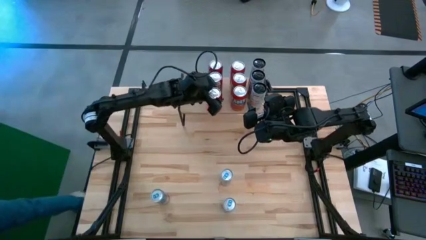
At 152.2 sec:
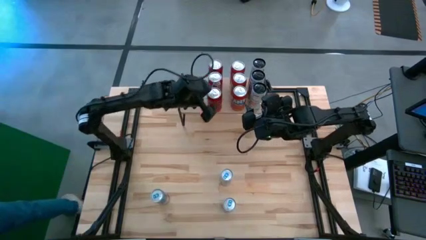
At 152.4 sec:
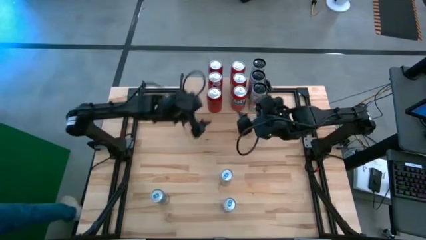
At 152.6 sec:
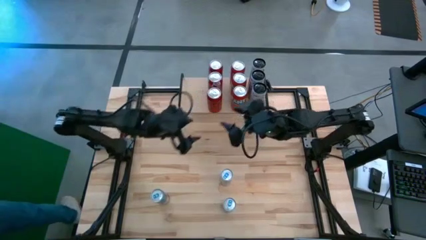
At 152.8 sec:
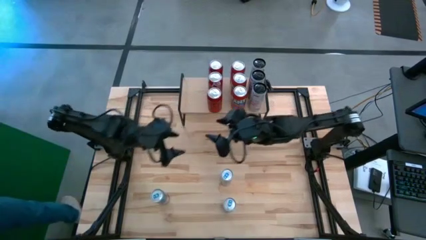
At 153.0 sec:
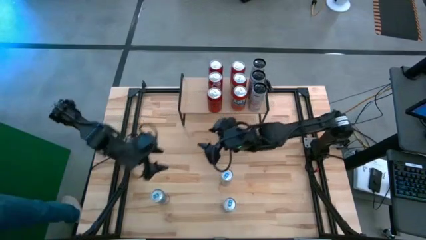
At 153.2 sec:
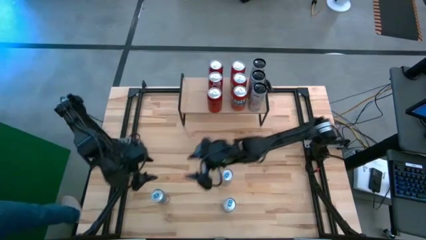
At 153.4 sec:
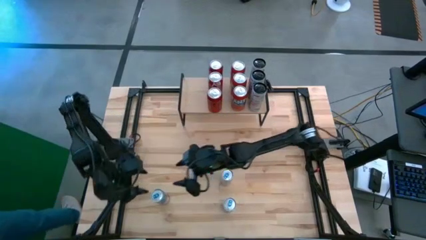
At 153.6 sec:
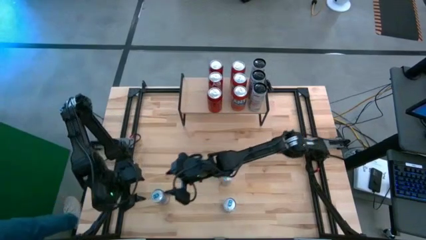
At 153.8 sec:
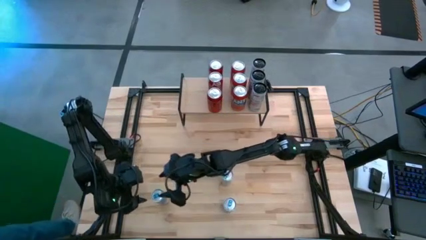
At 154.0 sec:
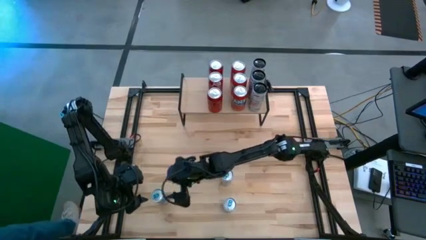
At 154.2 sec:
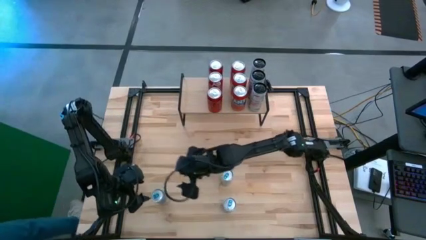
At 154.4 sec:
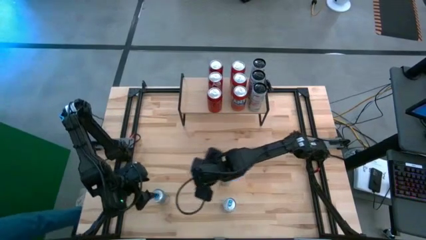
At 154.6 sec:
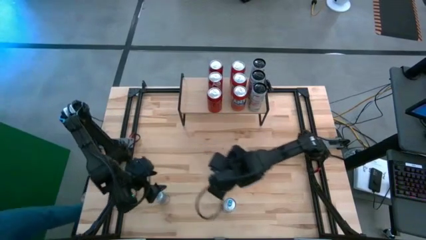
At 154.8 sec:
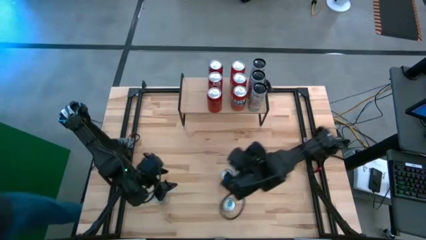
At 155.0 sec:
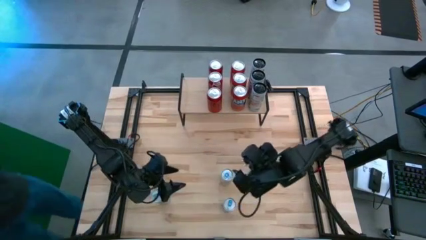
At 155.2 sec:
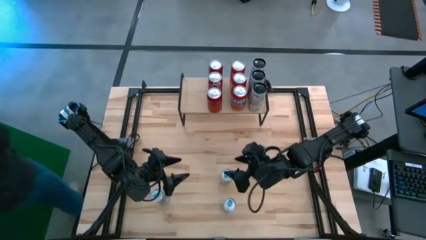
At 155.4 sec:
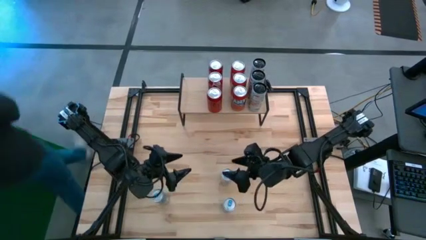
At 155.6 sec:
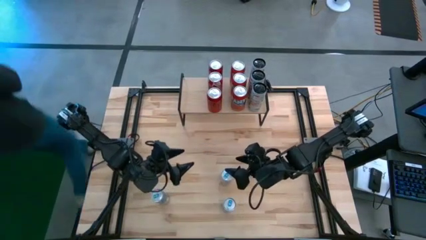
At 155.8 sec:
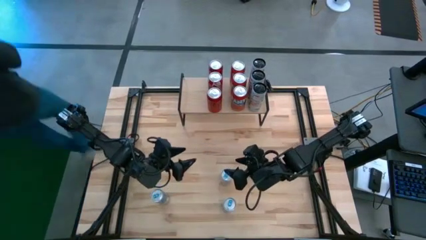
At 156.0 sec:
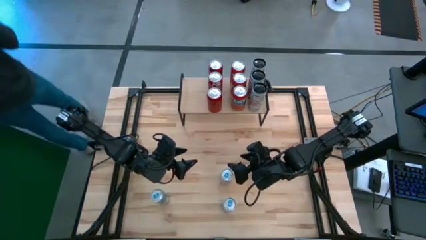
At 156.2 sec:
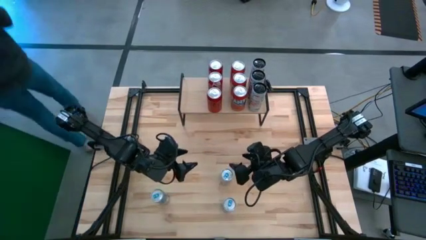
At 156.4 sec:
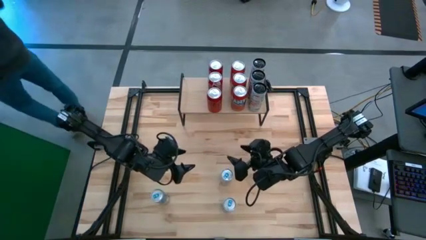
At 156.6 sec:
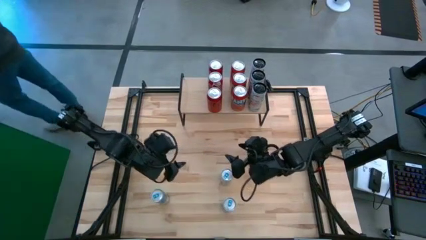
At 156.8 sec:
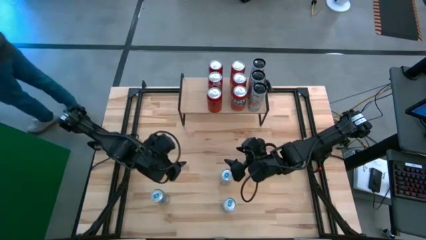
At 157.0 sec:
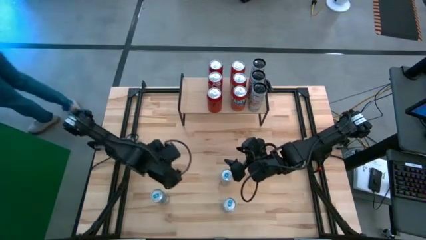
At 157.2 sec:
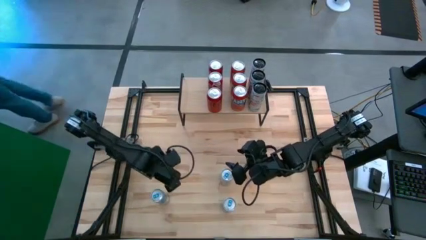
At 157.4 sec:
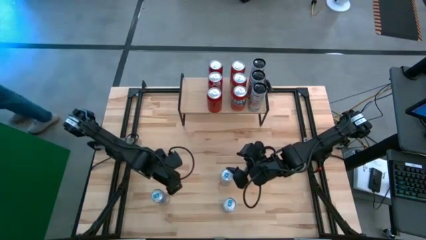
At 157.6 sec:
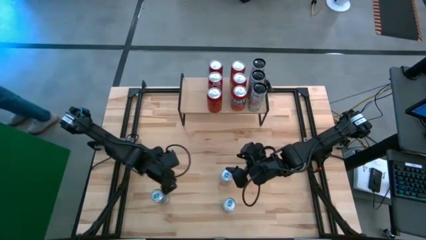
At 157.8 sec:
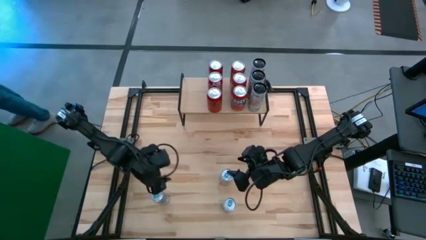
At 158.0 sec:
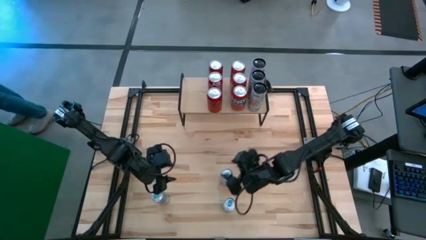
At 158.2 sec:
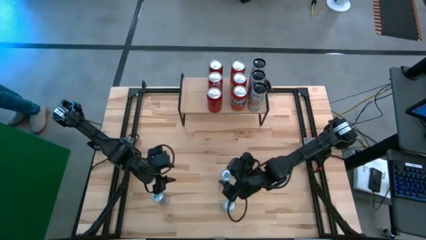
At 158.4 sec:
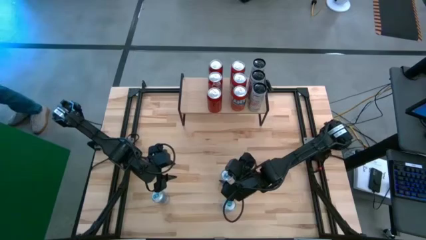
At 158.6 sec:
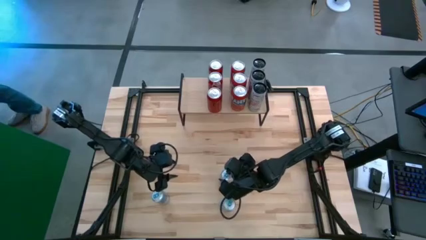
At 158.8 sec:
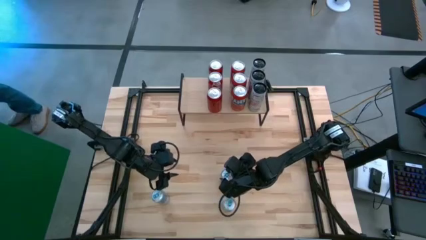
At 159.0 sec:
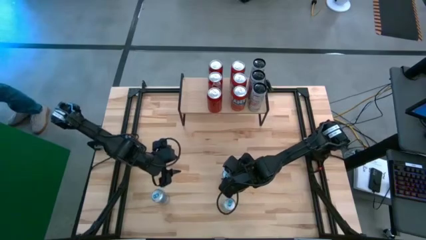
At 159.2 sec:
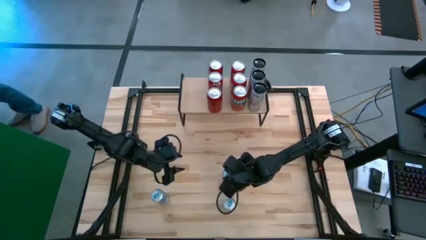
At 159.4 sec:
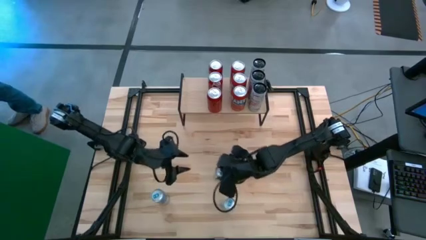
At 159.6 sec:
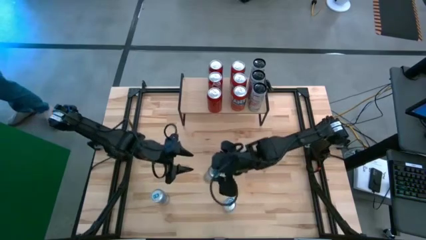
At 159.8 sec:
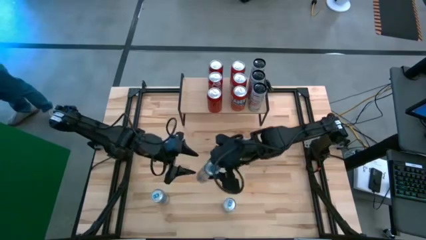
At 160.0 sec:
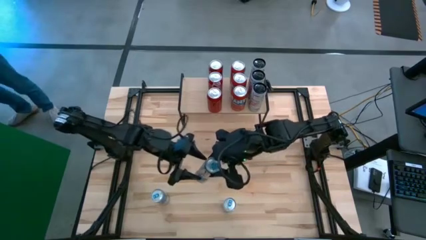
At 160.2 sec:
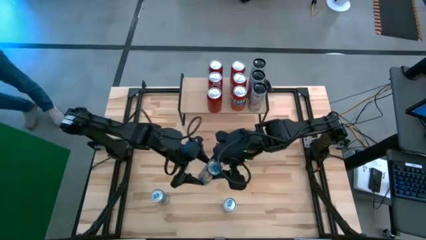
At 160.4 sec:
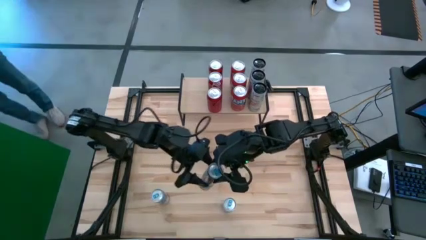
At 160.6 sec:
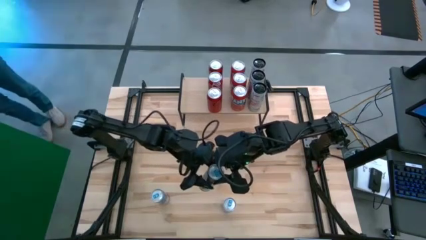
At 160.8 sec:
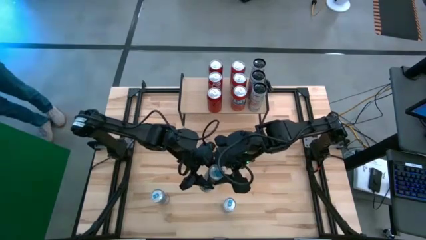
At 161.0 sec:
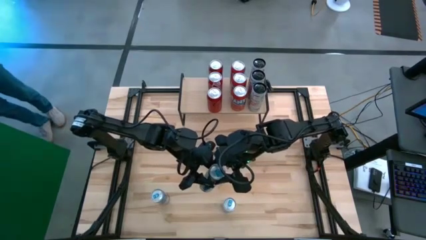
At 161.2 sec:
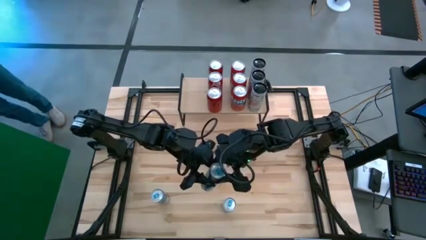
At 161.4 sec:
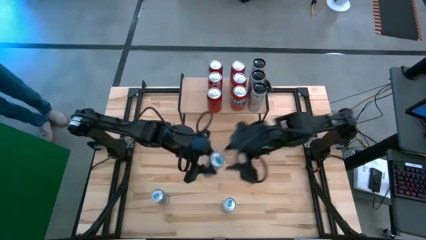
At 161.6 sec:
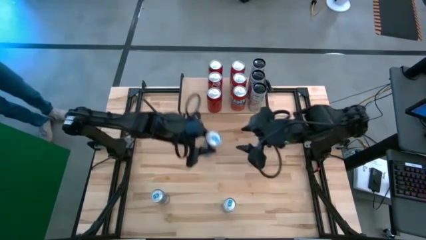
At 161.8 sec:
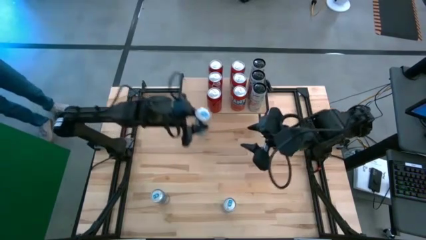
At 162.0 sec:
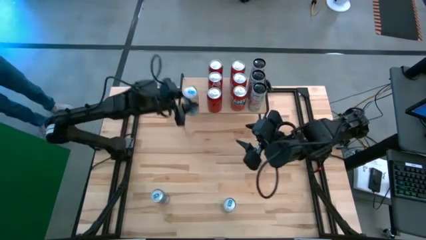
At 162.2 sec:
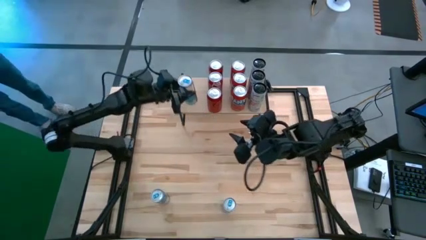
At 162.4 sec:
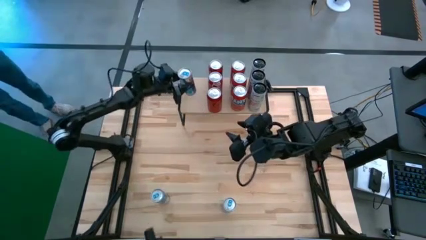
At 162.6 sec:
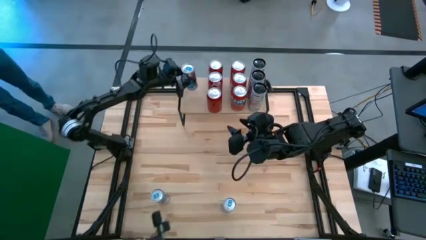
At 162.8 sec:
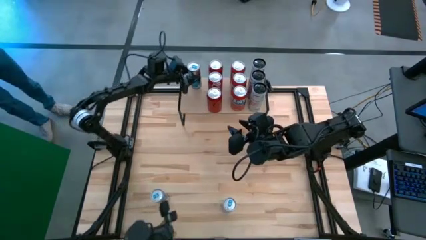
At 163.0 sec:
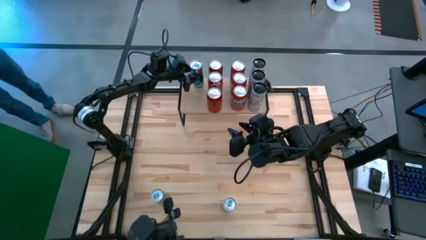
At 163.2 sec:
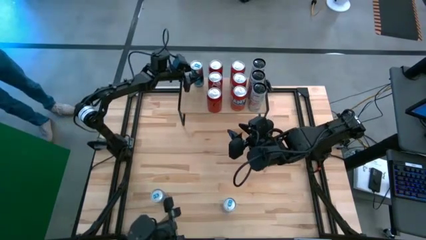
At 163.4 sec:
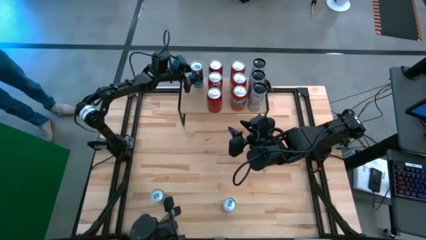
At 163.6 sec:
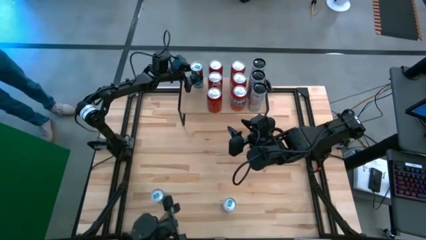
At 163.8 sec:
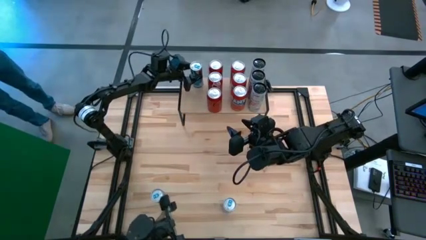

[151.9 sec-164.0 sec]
Task: Place canned beverage on shelf
Put the top blue soda can on the shelf

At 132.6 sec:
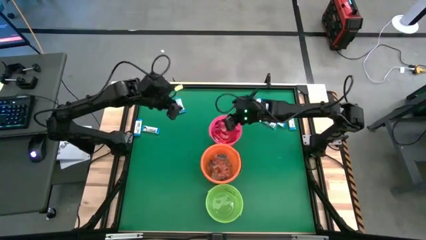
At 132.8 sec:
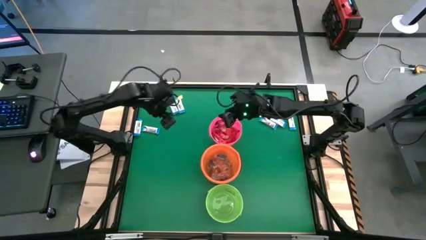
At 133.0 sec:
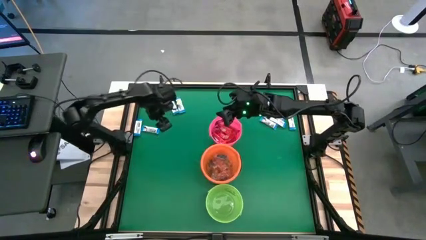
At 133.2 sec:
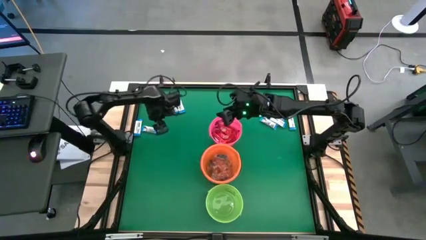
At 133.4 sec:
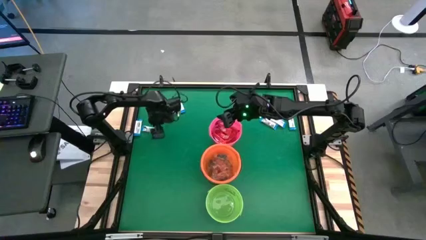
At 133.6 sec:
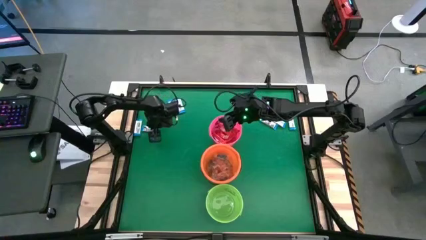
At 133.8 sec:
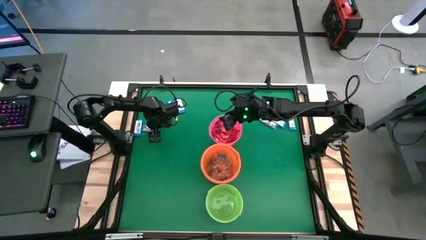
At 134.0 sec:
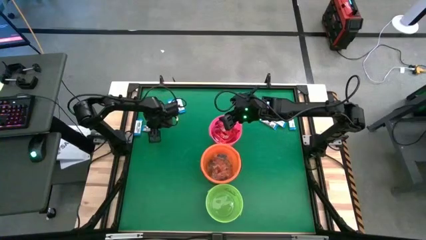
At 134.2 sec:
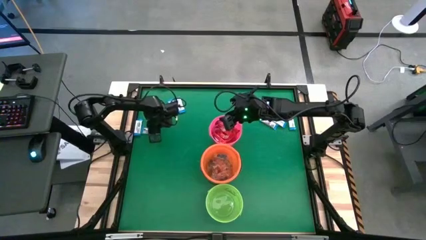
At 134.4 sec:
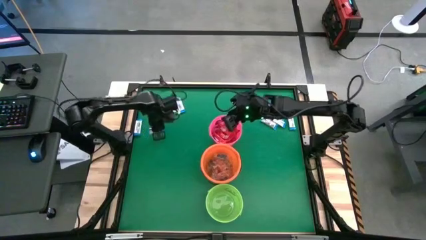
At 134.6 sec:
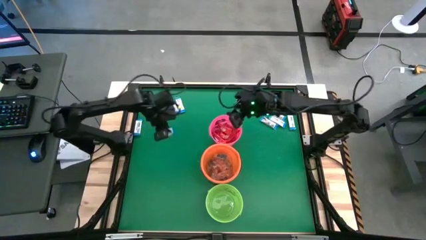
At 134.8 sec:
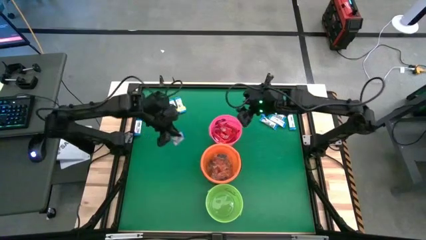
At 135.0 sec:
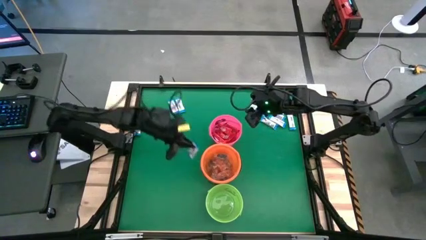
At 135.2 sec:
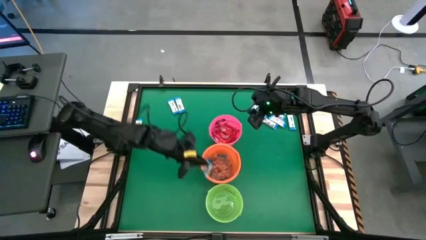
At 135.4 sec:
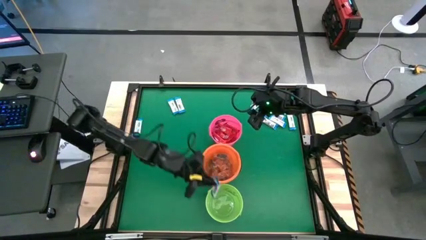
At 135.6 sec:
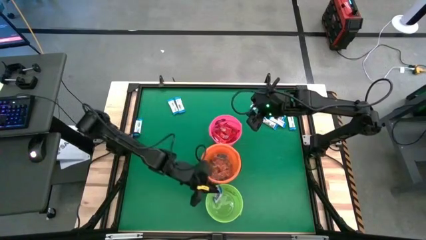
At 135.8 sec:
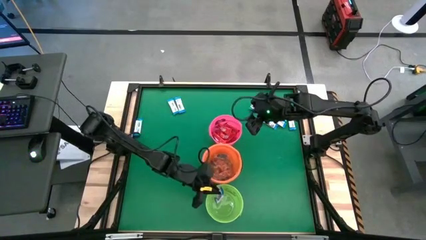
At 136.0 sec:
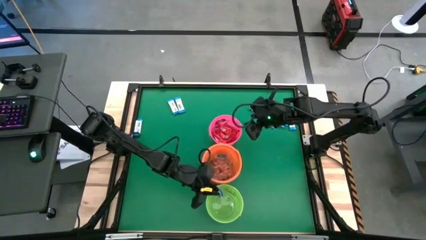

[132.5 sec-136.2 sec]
Task: Sort candy by brand, put in halloween buckets
Put the white chocolate into the green bucket

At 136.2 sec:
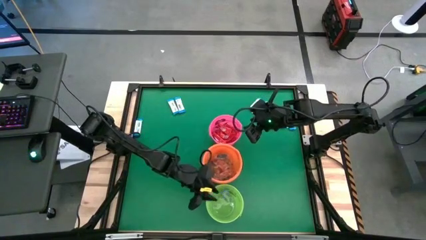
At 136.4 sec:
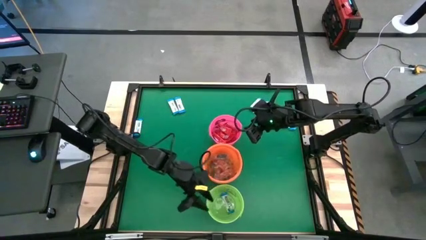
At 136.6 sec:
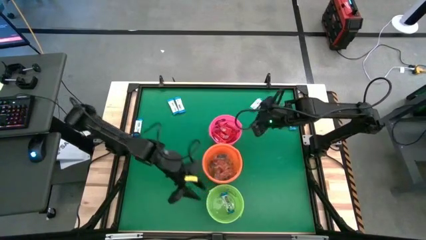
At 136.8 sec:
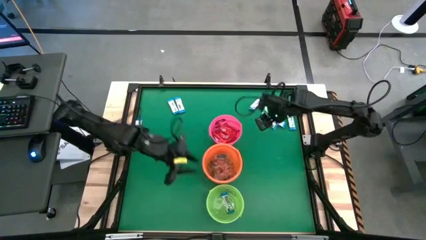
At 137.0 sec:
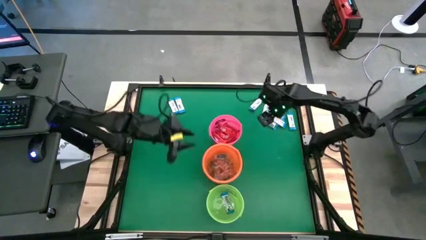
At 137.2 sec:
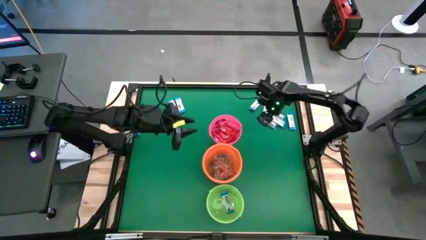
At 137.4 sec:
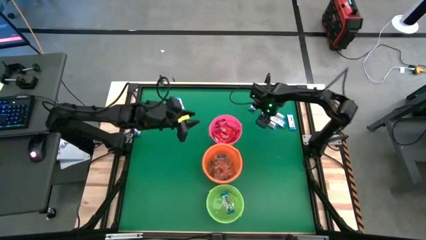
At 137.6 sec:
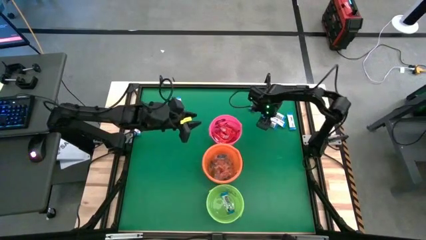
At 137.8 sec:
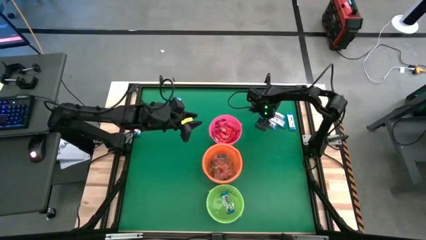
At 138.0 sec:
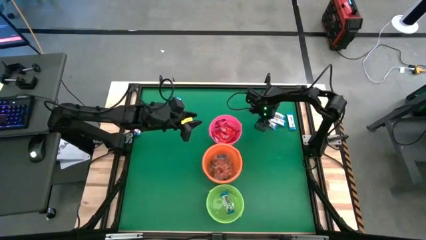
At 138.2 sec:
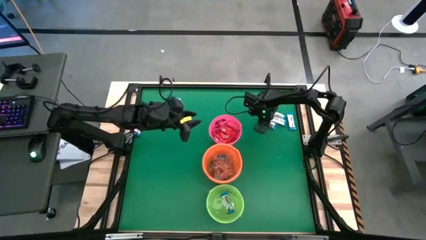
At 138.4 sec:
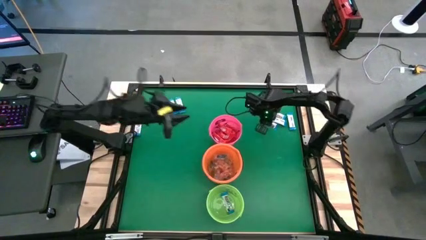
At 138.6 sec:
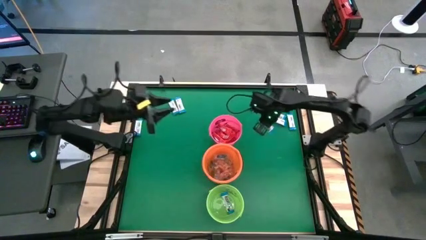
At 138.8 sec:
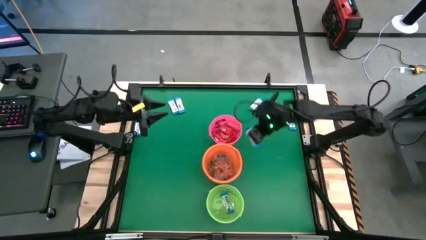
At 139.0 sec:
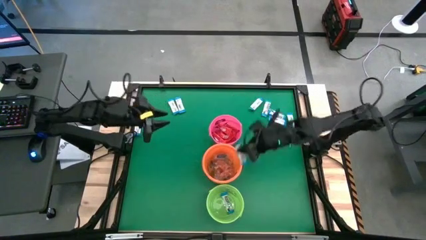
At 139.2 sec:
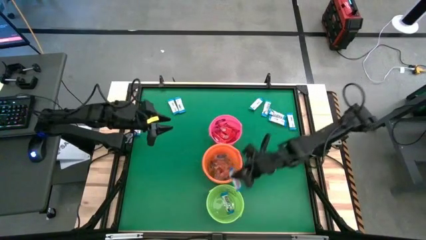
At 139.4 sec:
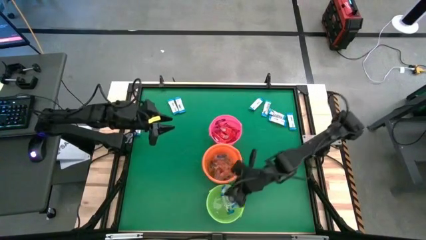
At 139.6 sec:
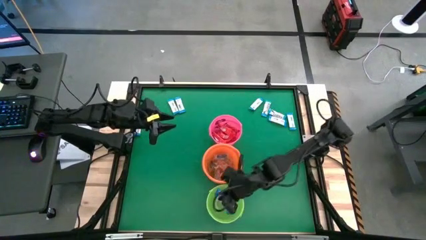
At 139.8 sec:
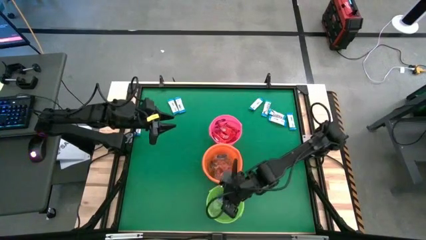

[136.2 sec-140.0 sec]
Put the white chocolate into the green bucket
